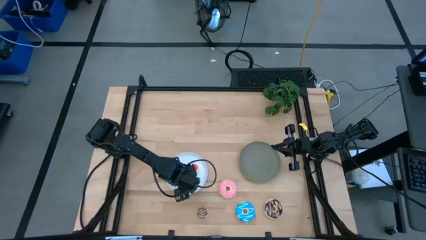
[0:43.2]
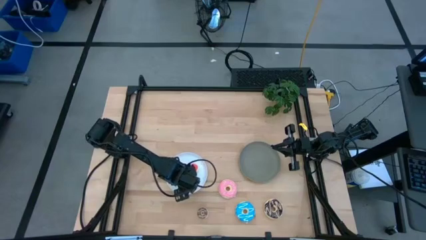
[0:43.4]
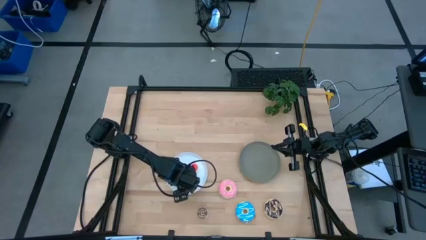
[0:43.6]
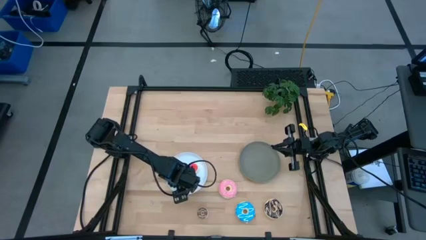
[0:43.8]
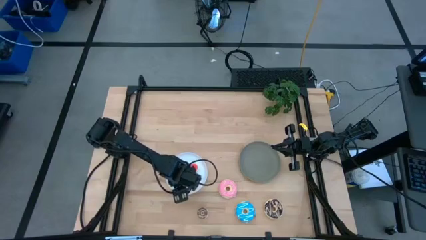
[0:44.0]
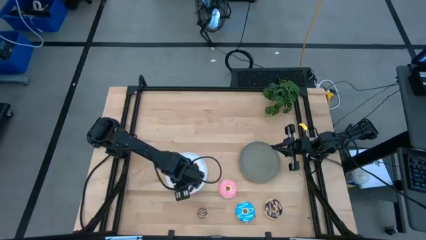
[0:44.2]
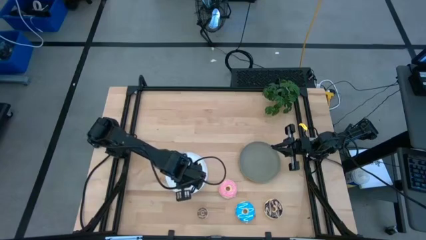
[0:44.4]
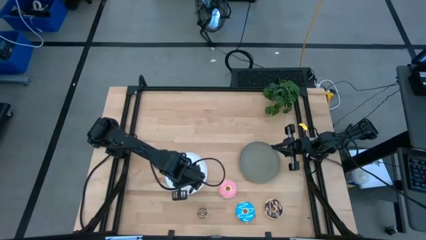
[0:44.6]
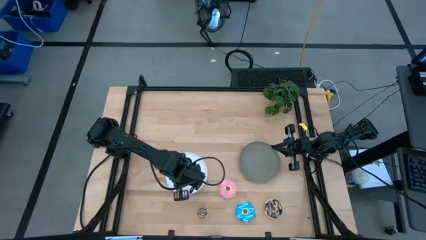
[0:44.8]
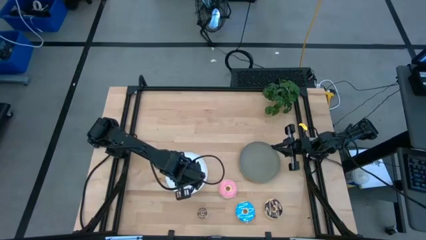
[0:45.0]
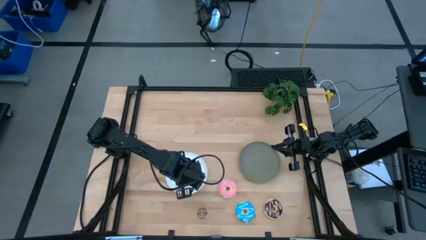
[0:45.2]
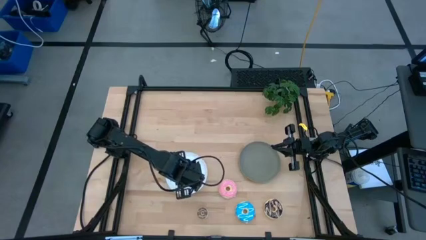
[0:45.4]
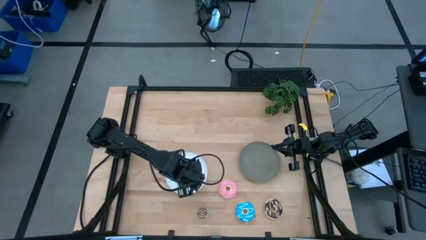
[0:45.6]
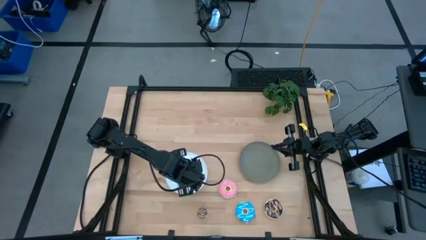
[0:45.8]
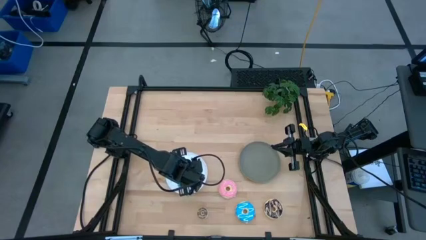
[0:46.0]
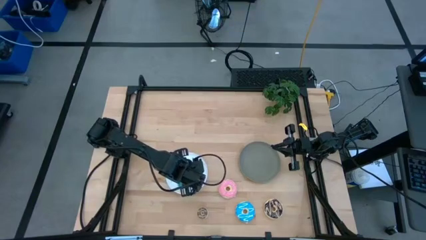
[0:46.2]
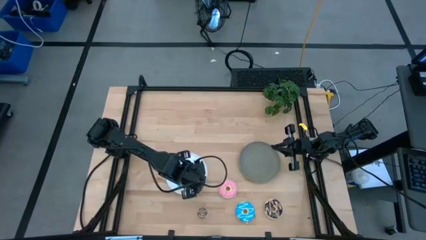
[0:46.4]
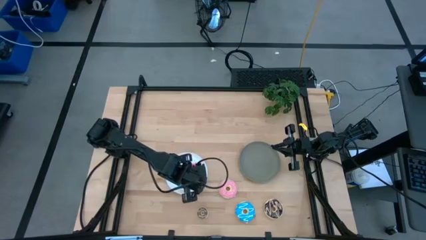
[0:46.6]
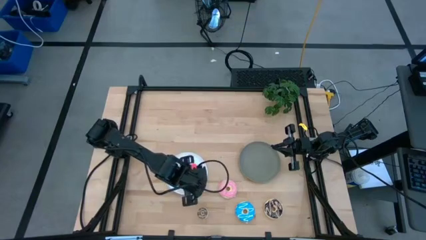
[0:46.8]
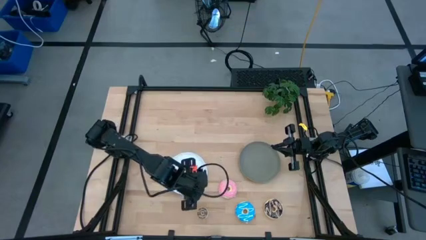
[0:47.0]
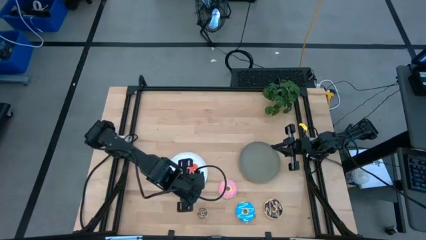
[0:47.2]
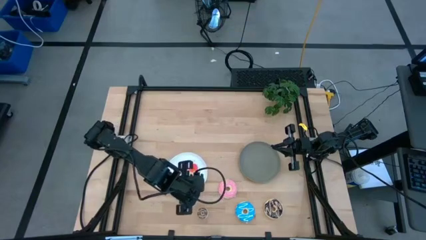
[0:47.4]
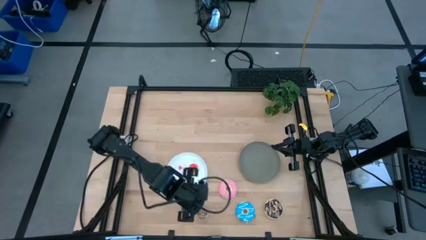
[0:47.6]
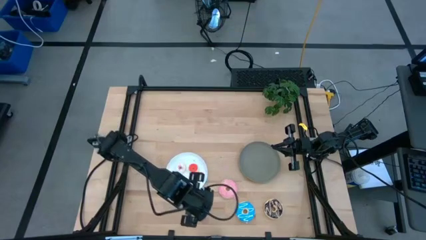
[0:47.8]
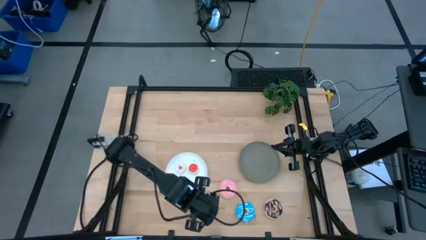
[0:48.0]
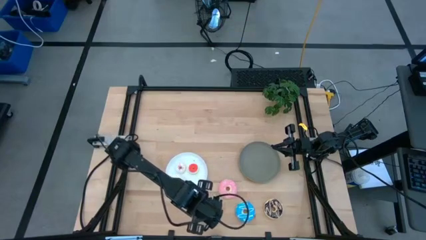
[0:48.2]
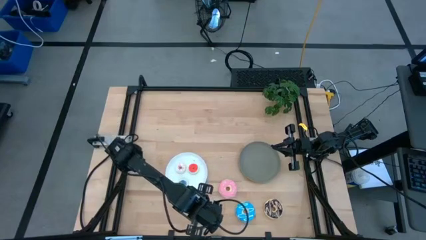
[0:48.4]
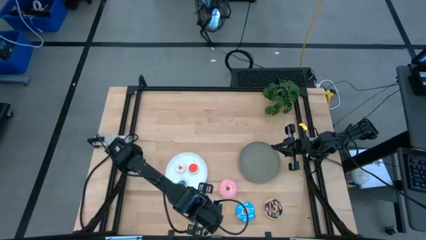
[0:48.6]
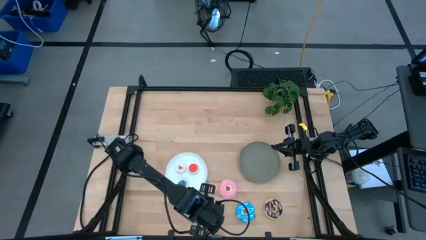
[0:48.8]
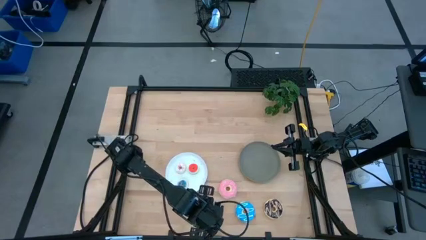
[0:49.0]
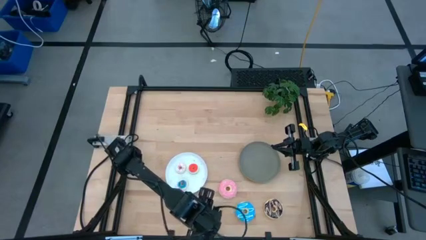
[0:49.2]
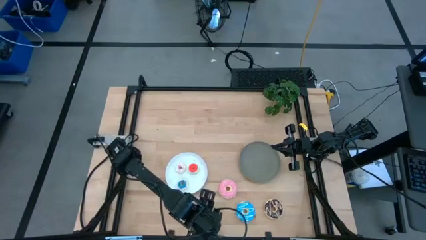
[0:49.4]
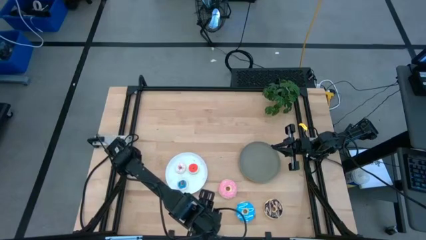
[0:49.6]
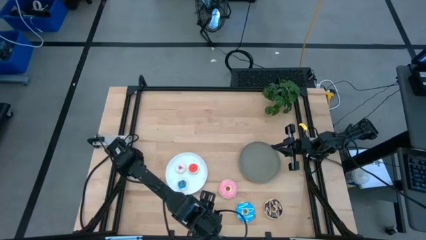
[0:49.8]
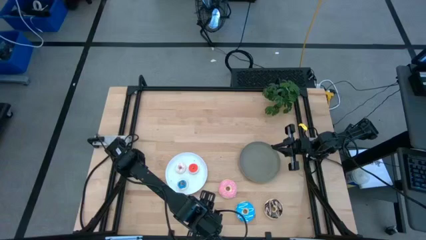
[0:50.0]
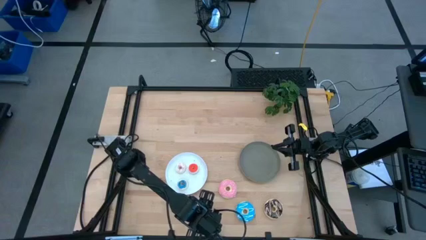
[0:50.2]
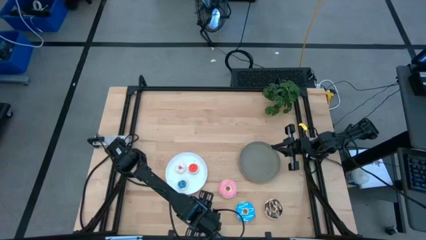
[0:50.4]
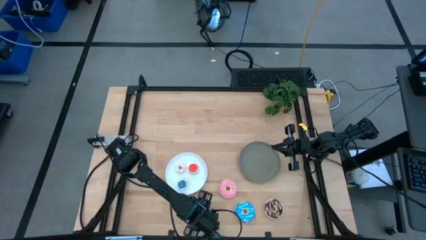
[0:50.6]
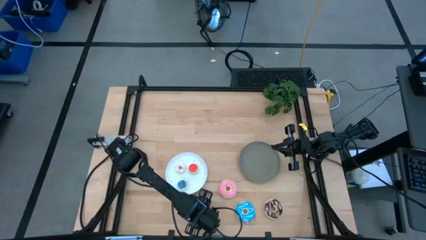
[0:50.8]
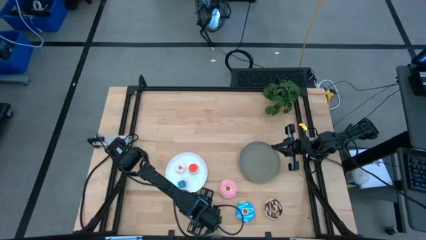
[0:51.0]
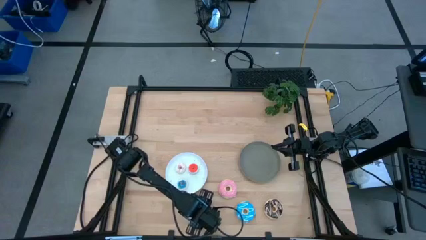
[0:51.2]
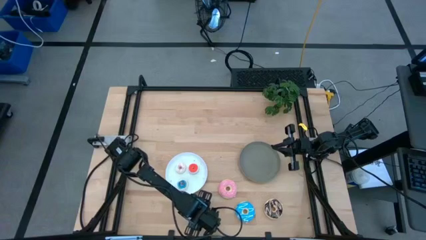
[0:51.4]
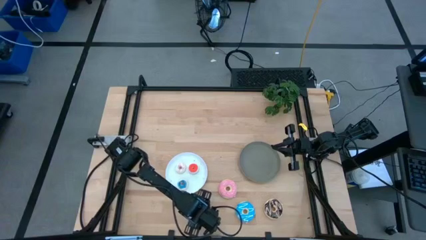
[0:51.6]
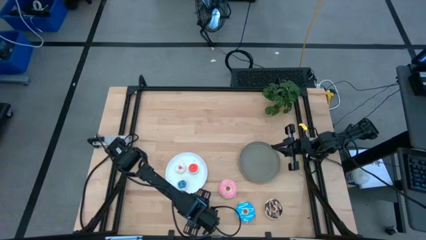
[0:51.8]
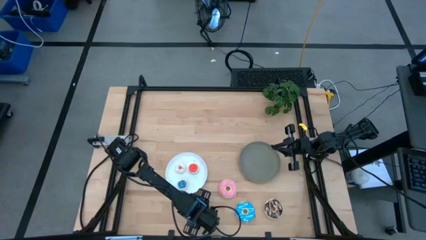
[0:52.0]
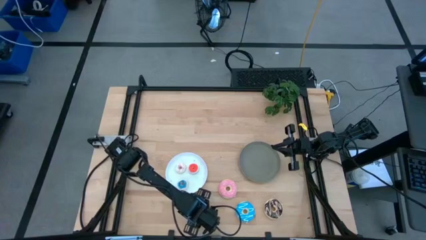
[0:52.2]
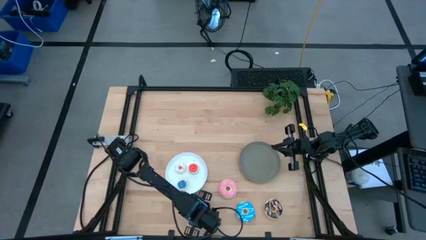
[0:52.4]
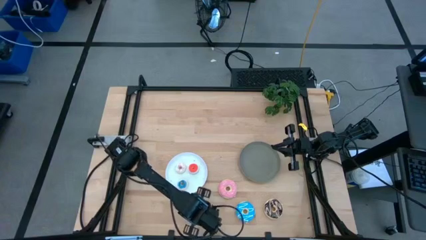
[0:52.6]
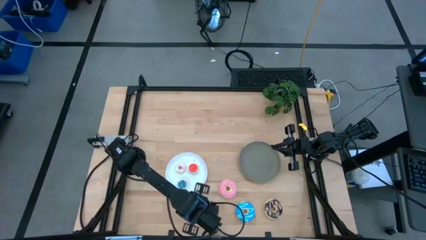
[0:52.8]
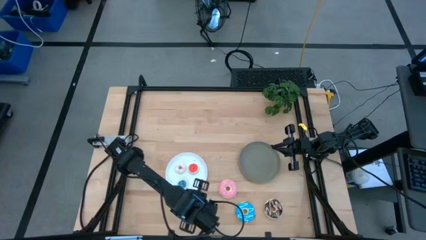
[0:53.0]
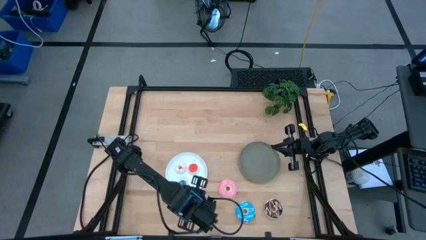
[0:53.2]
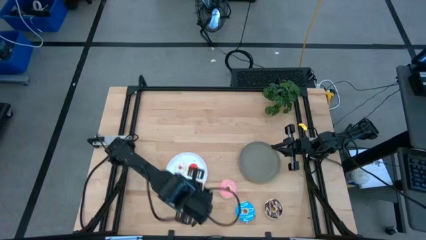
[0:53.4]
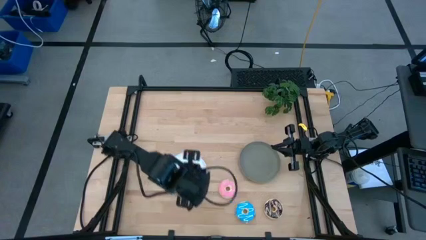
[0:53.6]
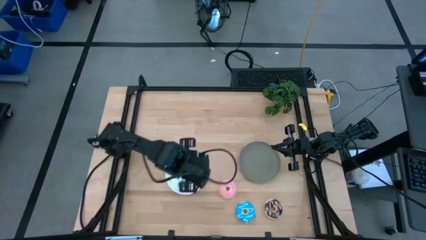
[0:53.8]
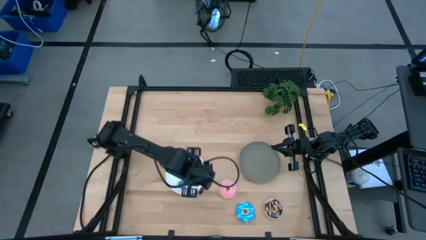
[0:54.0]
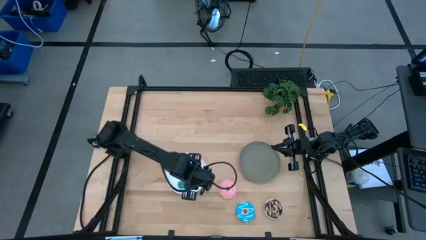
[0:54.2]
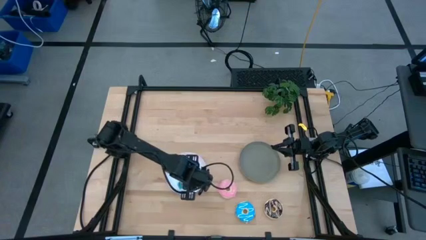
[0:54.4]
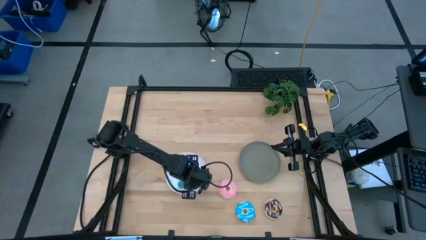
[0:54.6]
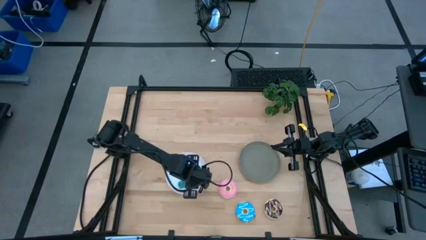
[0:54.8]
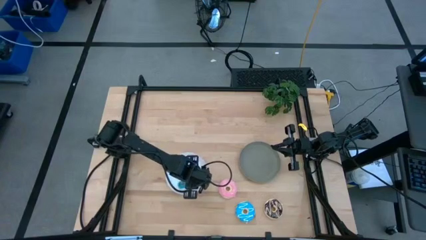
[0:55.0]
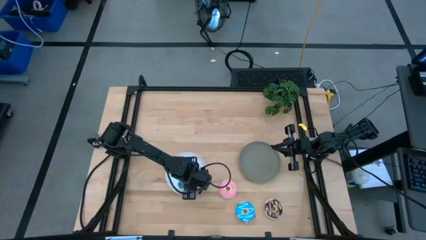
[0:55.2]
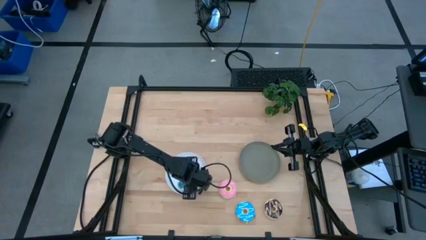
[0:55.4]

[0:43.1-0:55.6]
Task: Pick & Place donuts
Put the small brown donut on the white plate

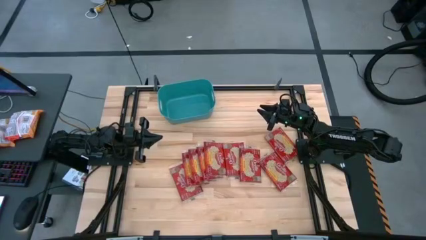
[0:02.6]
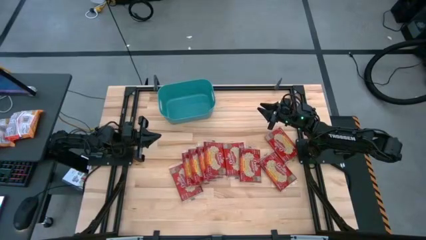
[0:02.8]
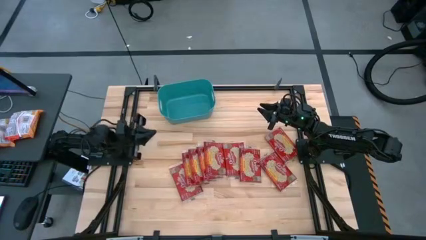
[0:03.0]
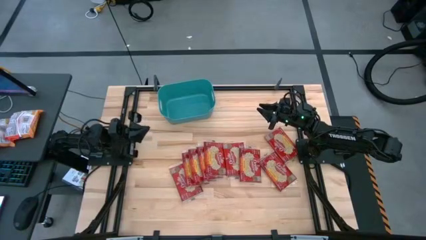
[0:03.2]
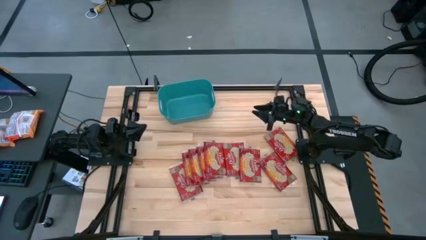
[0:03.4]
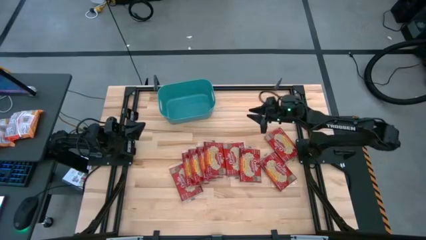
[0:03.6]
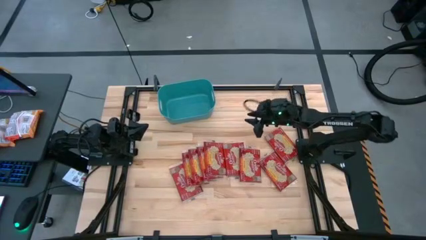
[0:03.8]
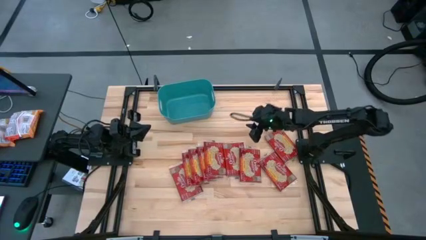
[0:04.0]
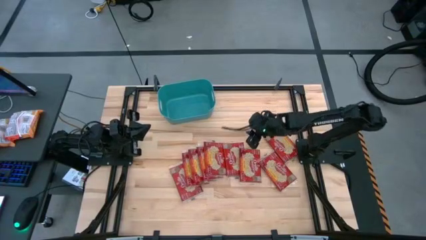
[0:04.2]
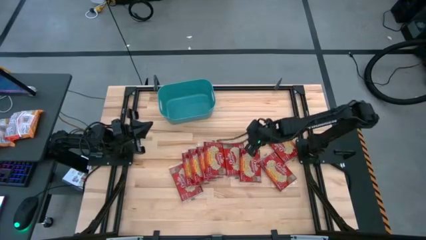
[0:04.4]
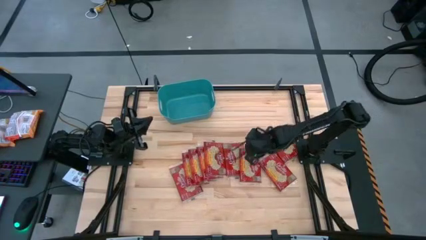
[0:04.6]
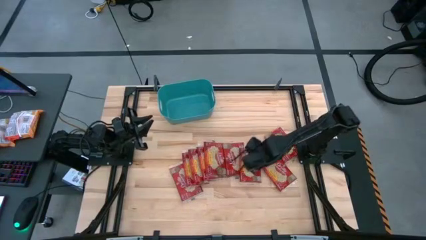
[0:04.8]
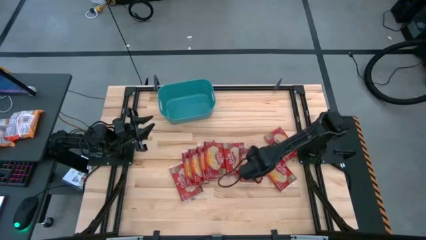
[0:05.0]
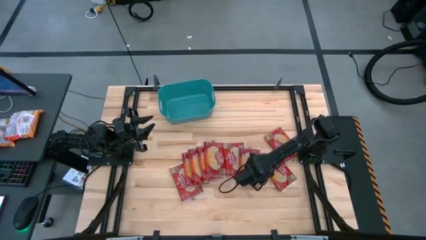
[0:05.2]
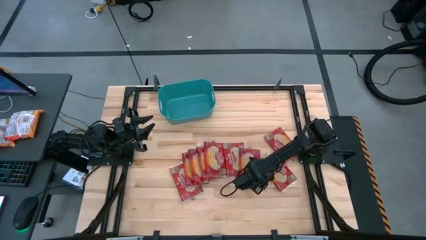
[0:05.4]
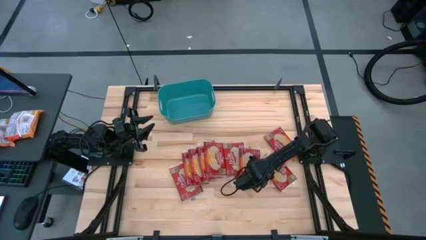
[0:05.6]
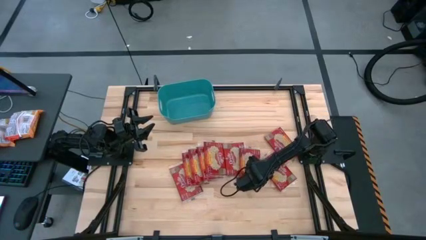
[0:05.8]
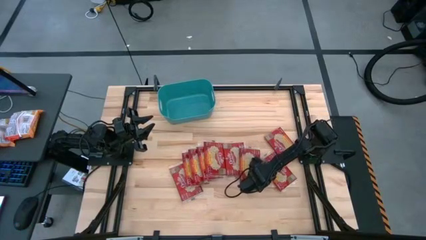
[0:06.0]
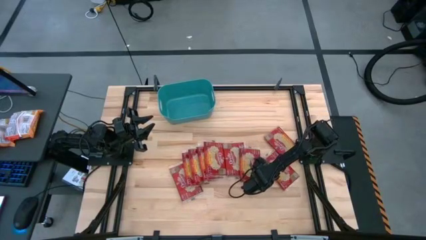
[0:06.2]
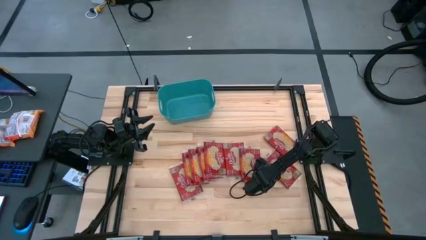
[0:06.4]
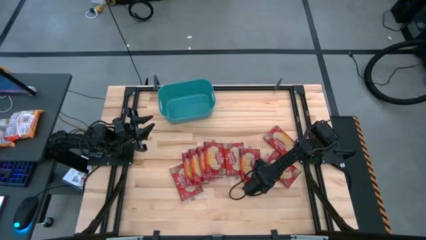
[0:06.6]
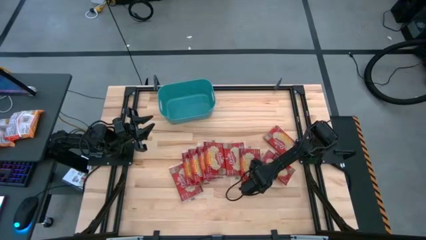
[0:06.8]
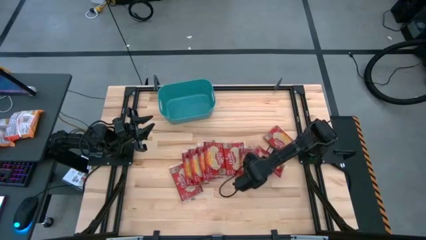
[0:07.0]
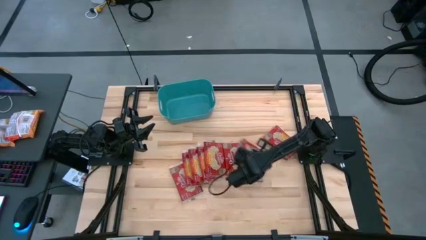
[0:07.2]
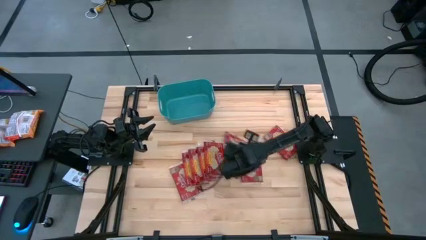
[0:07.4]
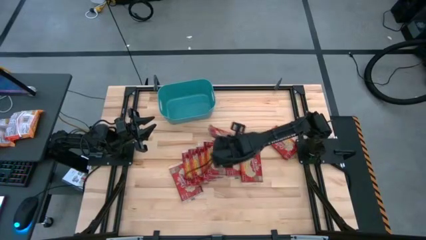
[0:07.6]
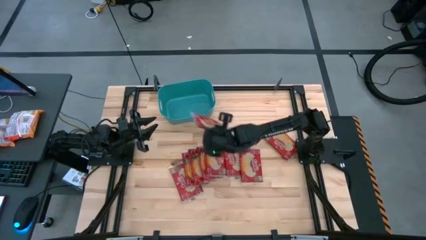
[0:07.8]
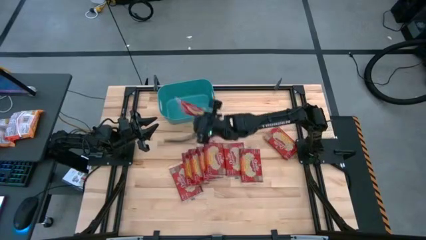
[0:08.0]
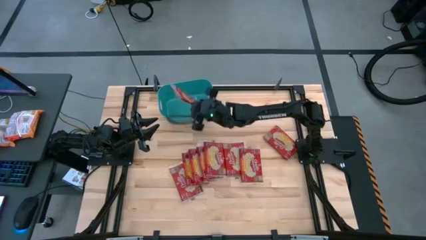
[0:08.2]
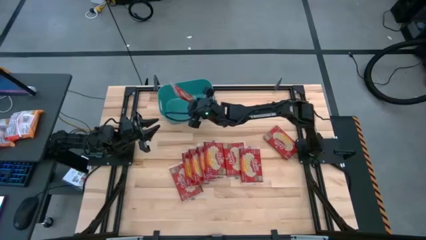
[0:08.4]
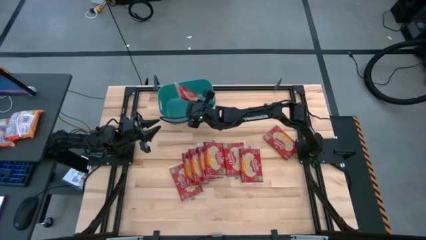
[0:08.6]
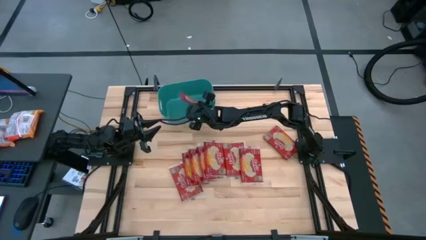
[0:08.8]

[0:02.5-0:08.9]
Task: Sort popcorn bags into baskets
Put the red popcorn bag into the blue container
